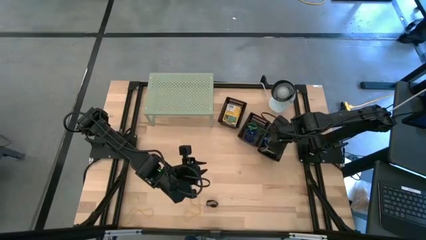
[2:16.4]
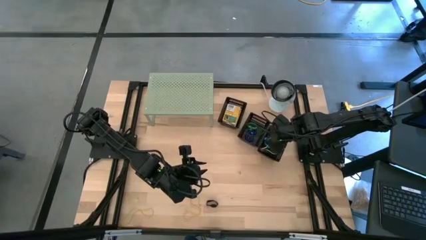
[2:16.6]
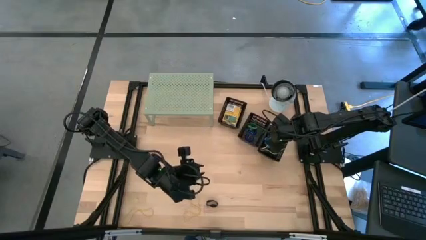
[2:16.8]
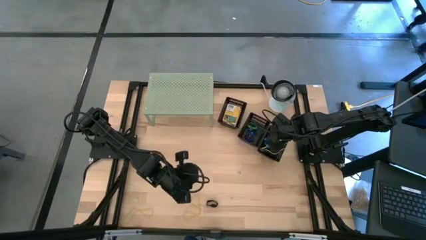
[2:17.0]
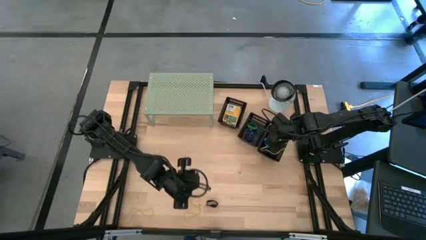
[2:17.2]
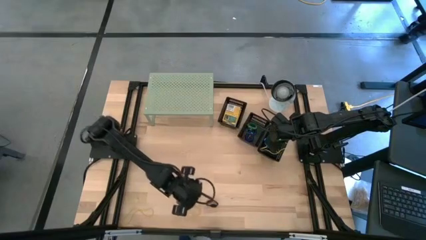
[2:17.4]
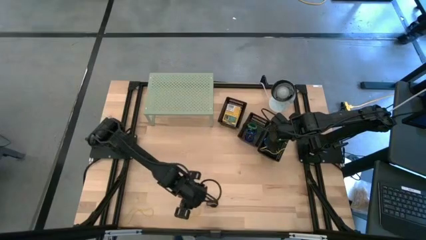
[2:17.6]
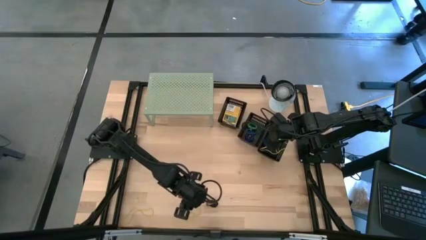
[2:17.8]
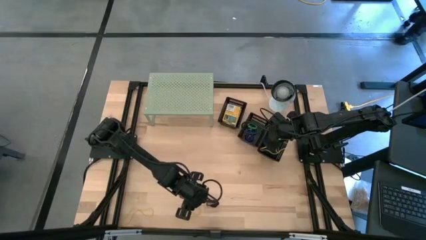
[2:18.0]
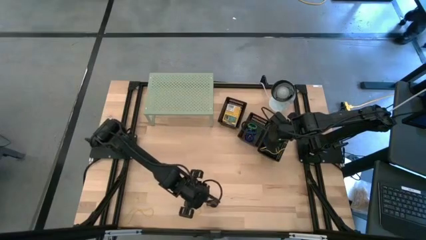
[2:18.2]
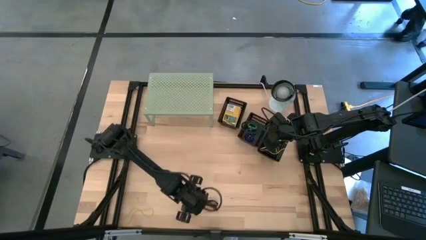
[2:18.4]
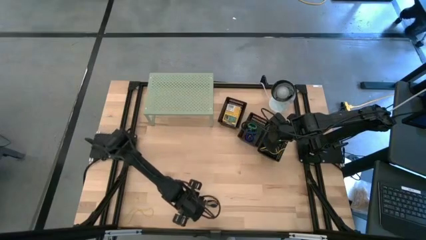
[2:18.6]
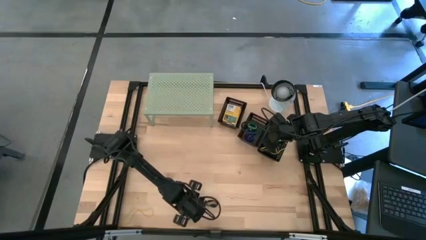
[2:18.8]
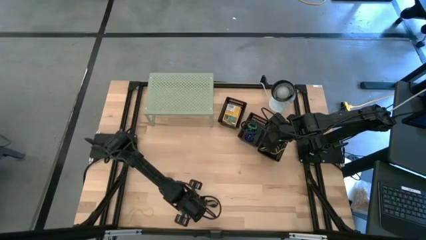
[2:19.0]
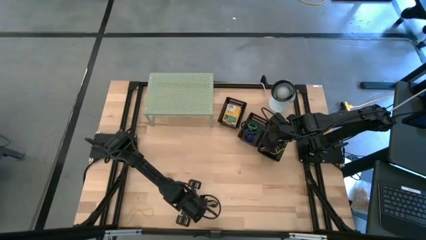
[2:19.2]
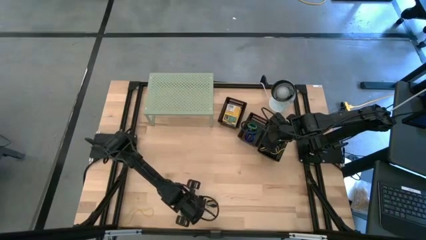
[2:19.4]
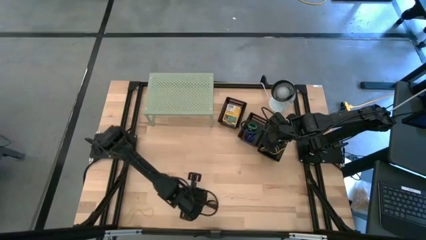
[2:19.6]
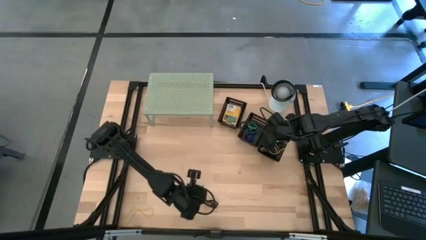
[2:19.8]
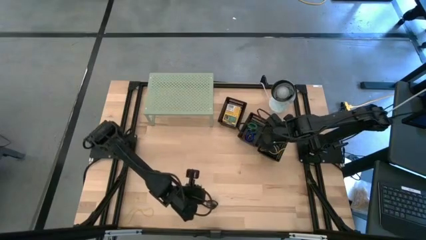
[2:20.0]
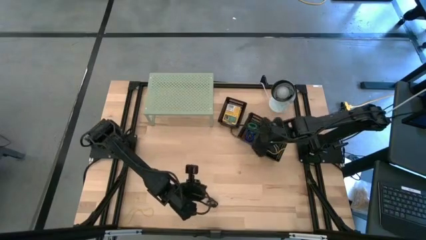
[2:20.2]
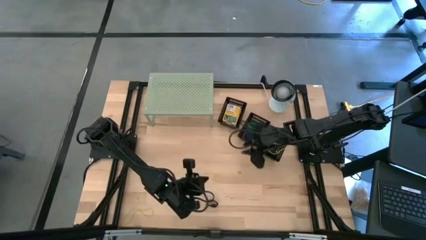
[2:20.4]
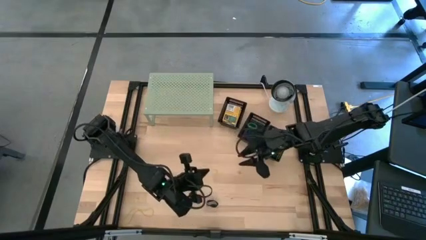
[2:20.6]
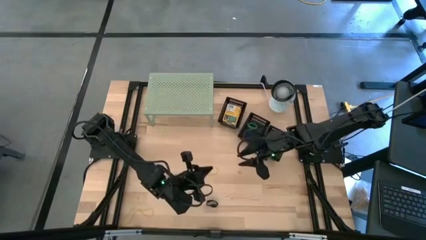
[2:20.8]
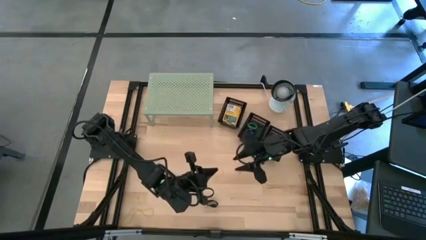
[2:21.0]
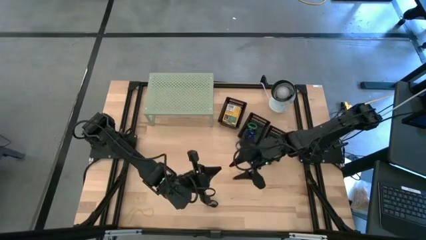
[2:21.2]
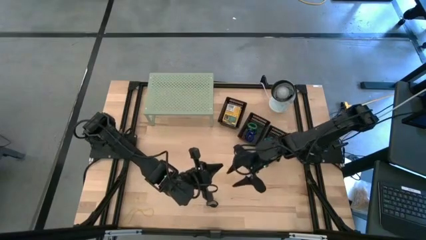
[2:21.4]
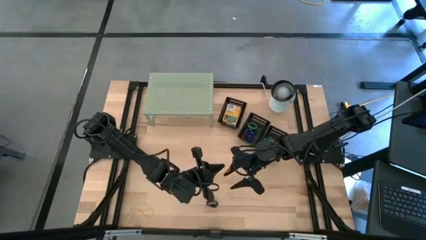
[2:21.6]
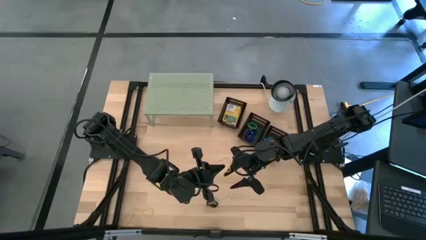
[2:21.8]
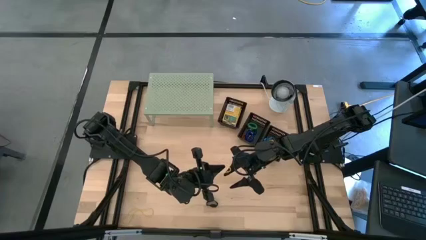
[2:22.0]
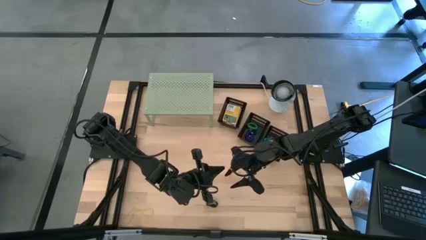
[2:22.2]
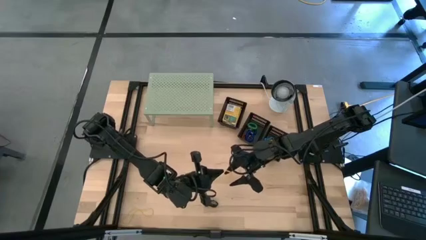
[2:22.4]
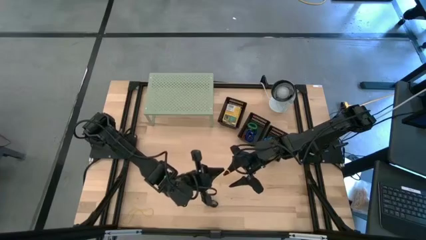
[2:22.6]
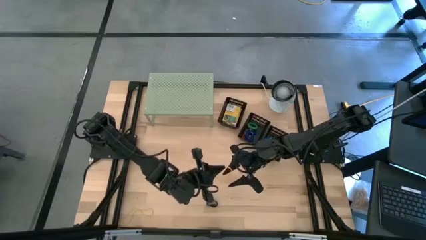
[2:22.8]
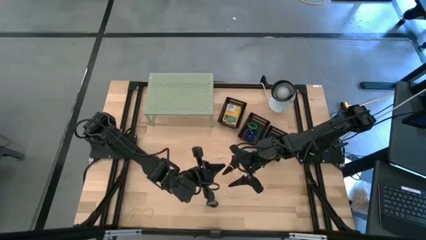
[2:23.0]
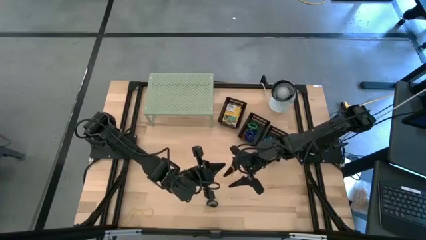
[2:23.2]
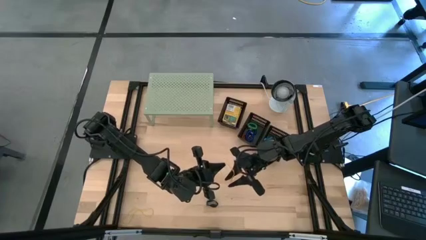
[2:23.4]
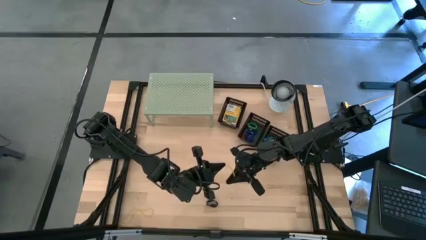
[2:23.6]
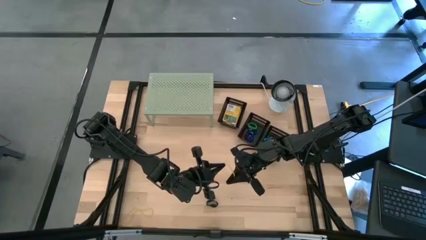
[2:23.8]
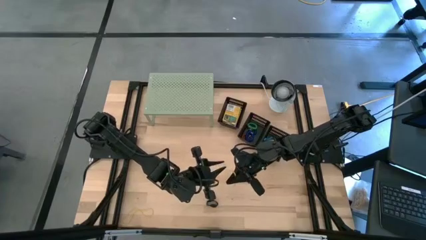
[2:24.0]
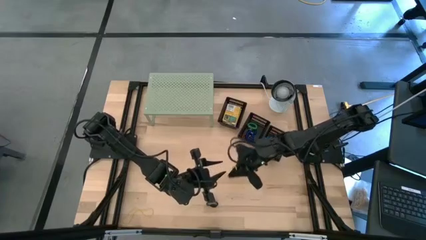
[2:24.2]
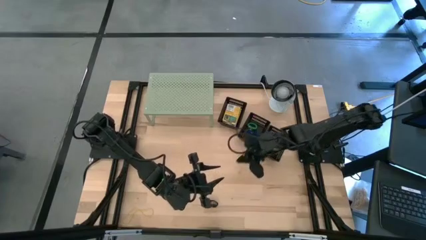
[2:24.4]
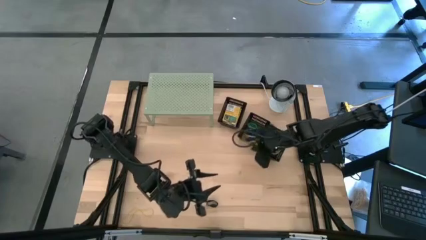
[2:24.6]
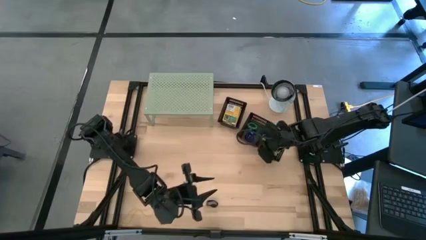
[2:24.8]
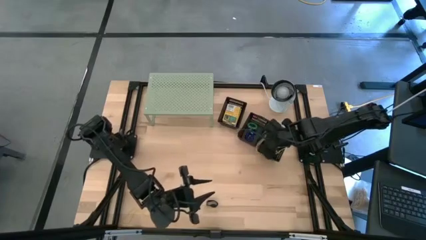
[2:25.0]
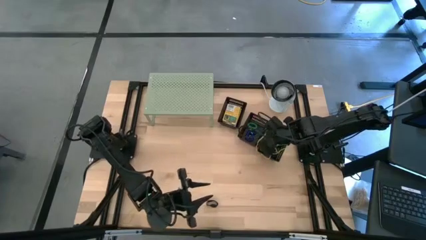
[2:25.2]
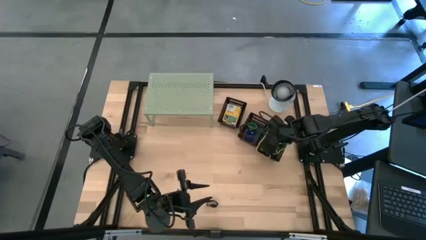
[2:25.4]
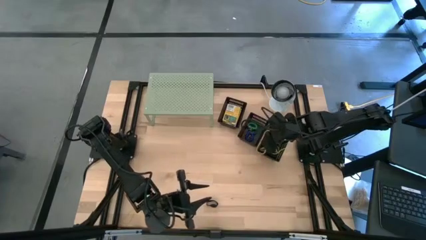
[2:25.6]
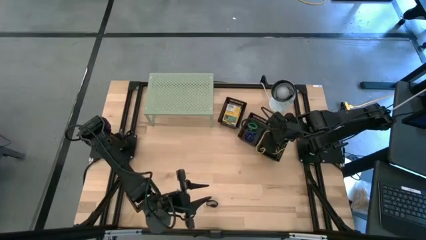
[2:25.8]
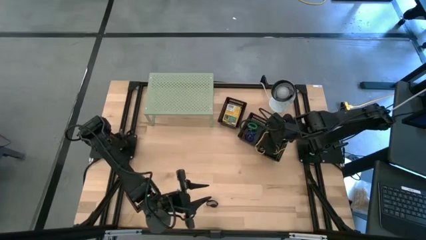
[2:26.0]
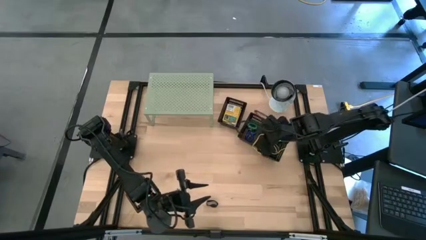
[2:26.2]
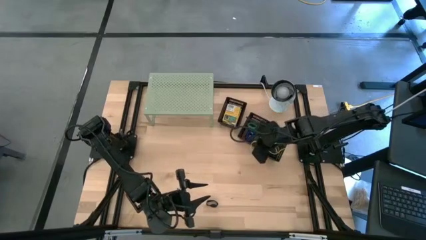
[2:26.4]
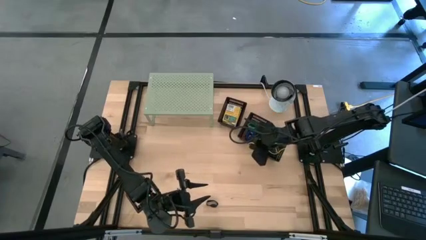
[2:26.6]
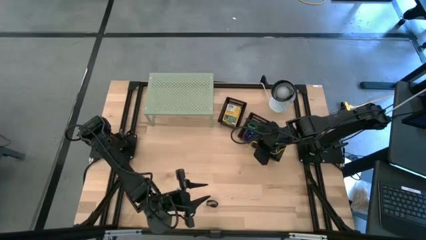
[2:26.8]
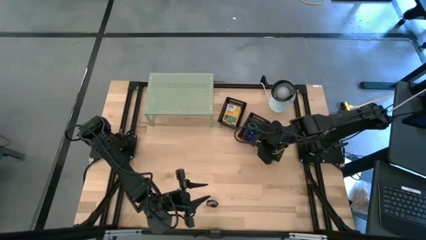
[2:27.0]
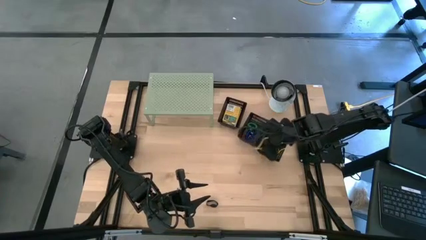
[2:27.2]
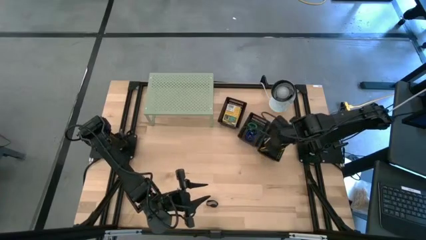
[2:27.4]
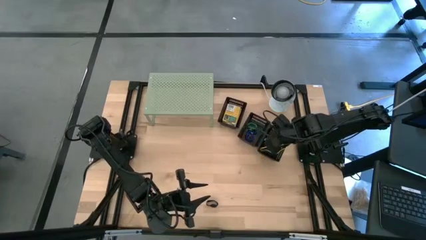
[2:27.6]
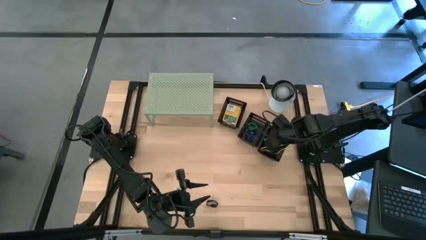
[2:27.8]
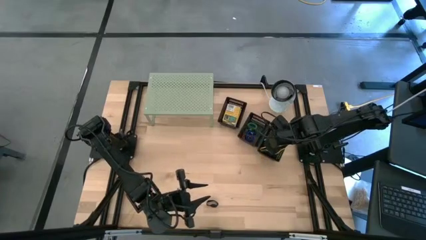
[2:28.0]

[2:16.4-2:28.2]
Task: Pick & Place Office Desk Supplies
Put the yellow rubber band into the bottom black bin
